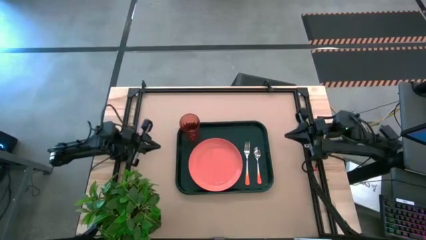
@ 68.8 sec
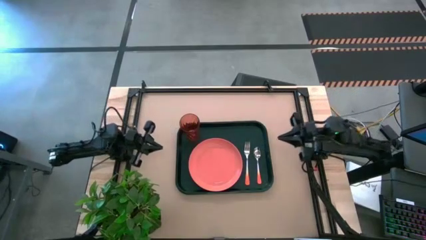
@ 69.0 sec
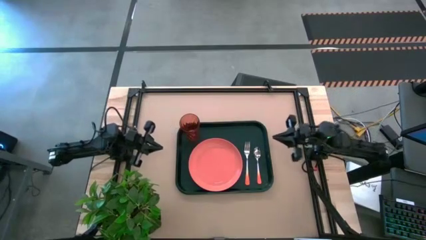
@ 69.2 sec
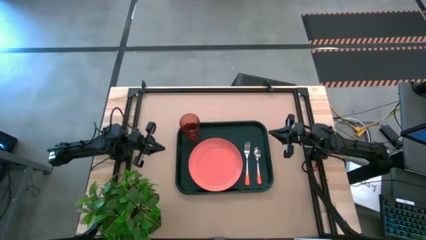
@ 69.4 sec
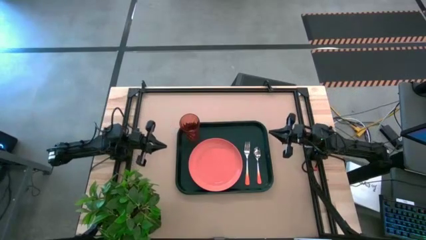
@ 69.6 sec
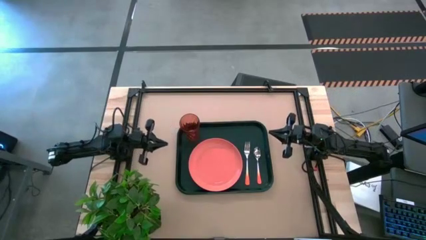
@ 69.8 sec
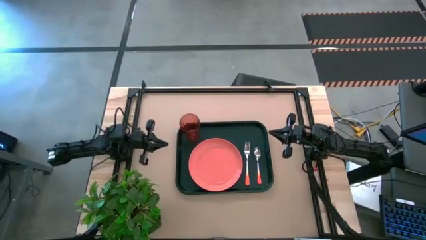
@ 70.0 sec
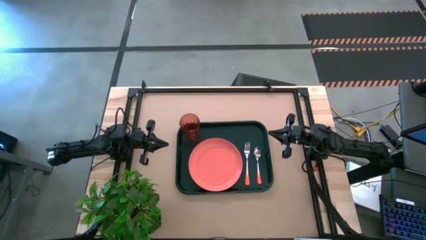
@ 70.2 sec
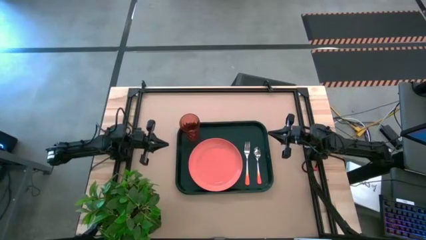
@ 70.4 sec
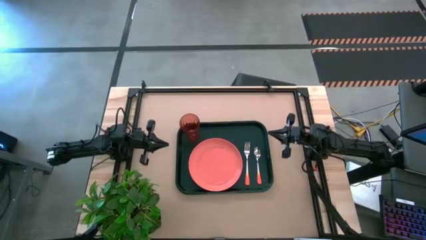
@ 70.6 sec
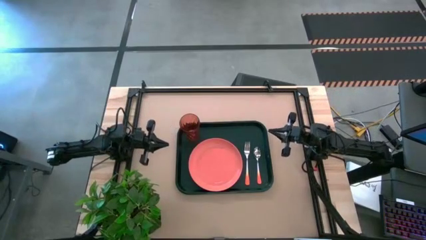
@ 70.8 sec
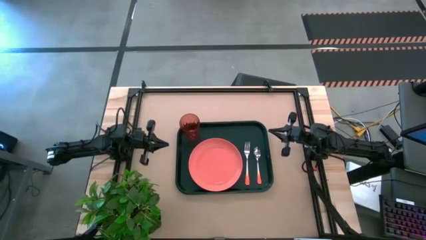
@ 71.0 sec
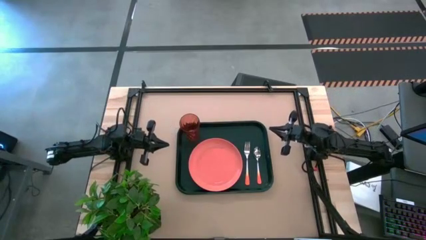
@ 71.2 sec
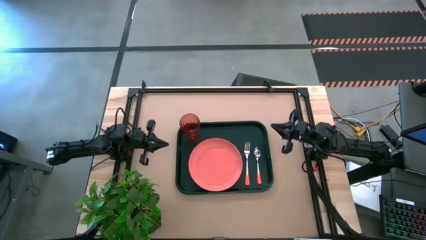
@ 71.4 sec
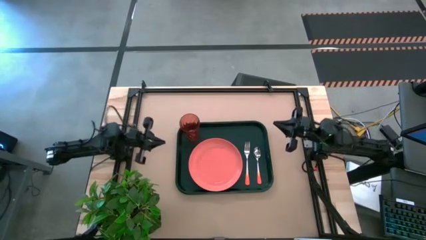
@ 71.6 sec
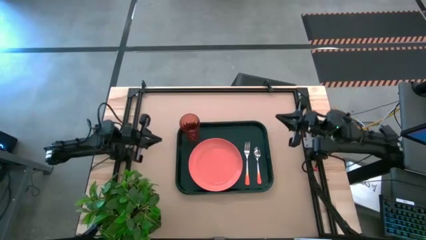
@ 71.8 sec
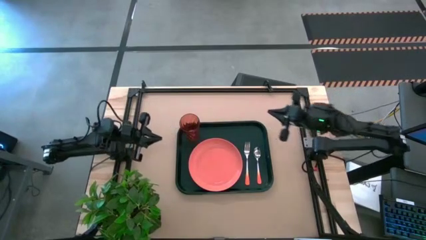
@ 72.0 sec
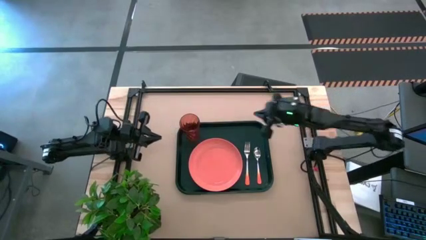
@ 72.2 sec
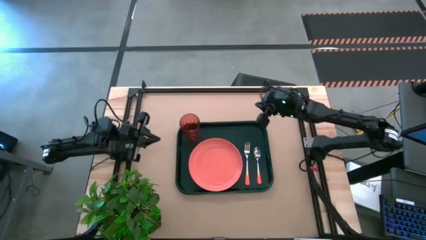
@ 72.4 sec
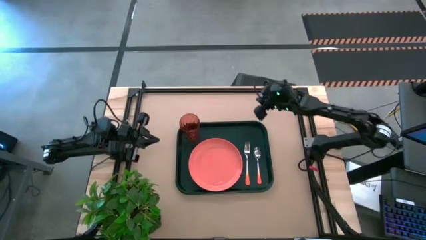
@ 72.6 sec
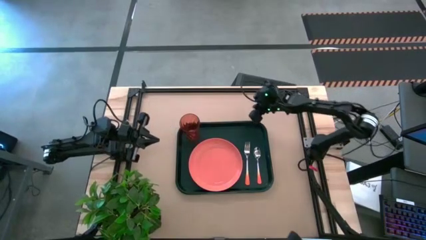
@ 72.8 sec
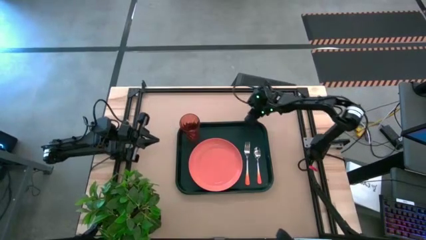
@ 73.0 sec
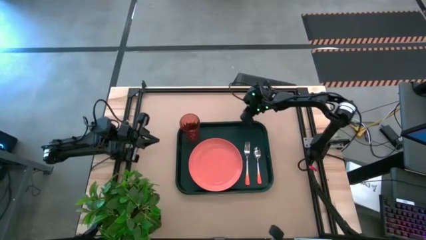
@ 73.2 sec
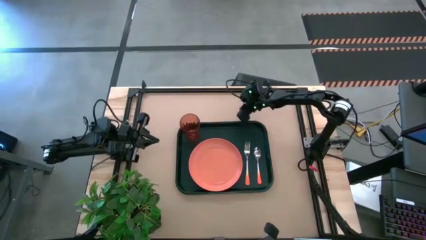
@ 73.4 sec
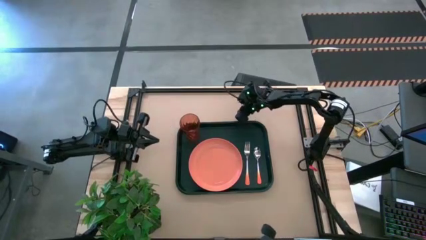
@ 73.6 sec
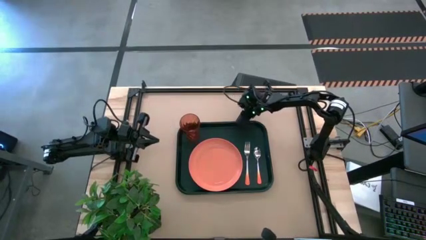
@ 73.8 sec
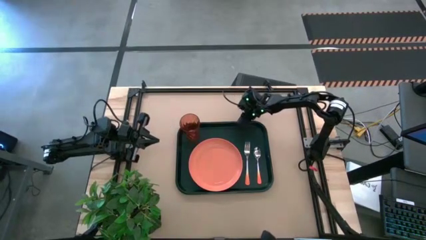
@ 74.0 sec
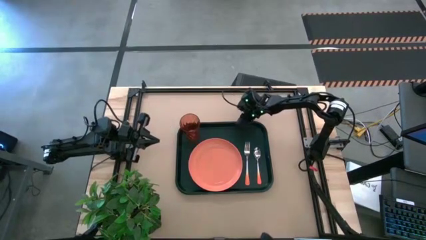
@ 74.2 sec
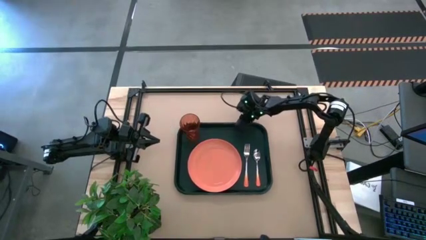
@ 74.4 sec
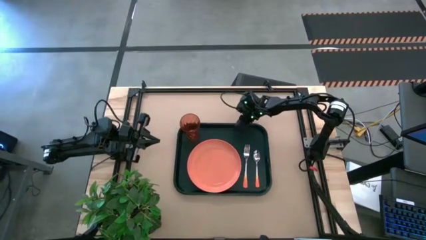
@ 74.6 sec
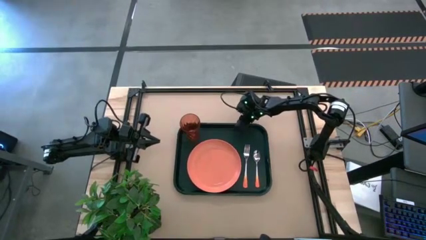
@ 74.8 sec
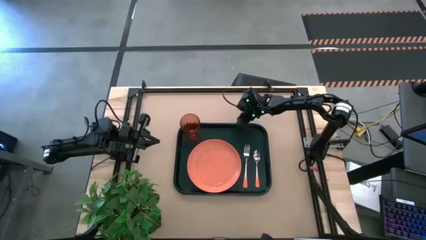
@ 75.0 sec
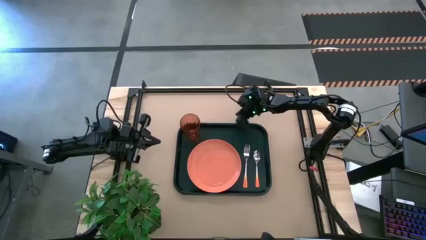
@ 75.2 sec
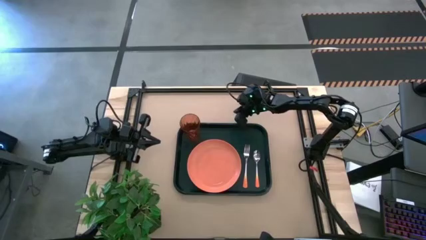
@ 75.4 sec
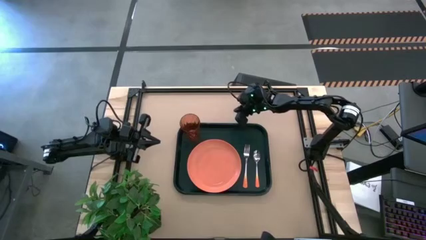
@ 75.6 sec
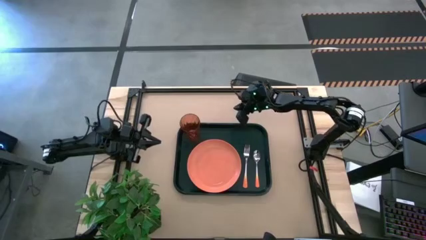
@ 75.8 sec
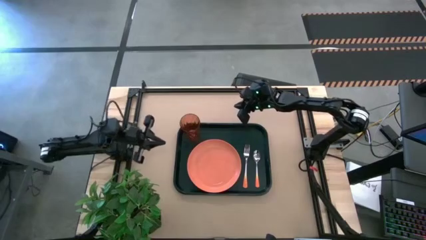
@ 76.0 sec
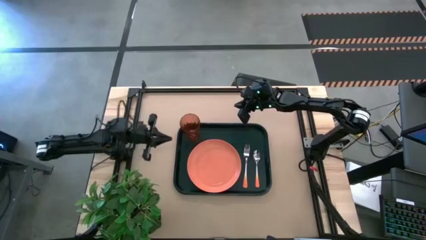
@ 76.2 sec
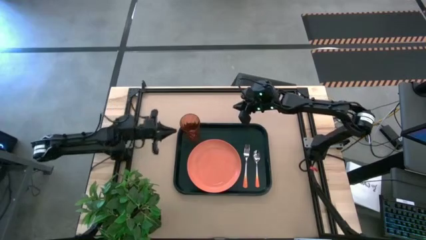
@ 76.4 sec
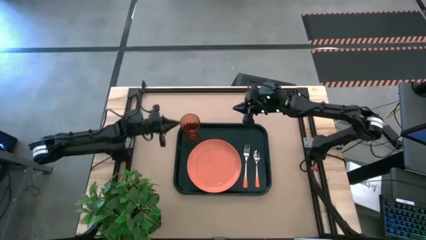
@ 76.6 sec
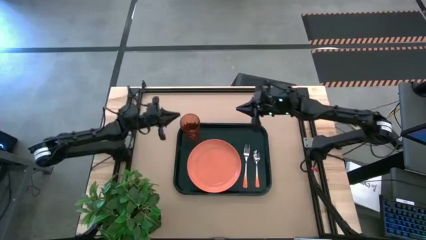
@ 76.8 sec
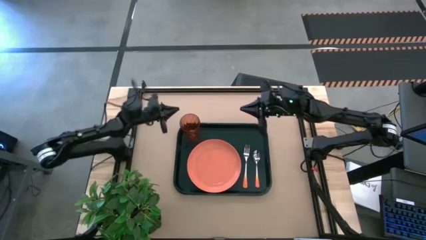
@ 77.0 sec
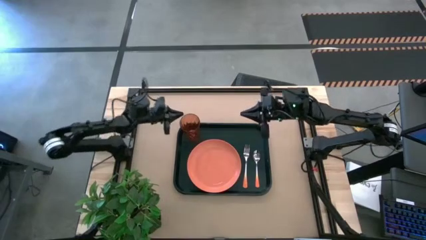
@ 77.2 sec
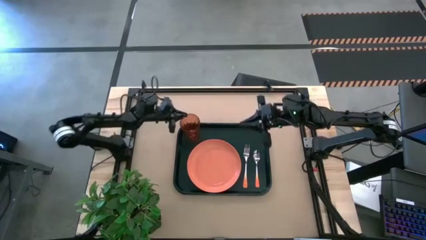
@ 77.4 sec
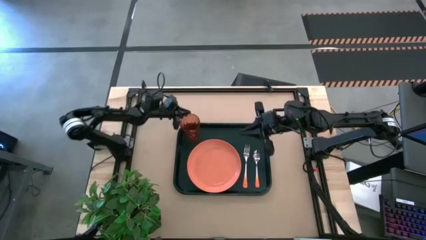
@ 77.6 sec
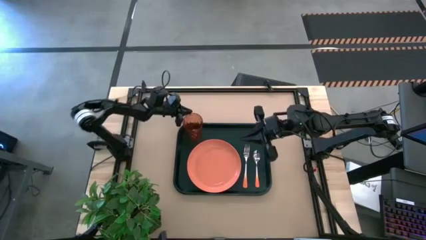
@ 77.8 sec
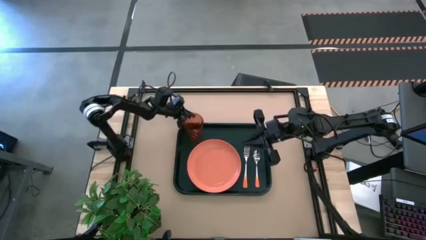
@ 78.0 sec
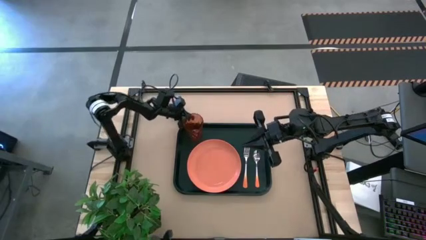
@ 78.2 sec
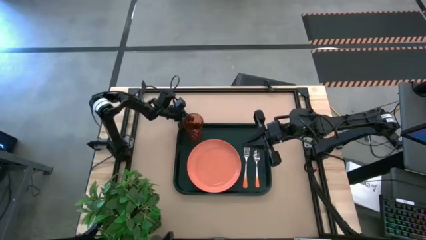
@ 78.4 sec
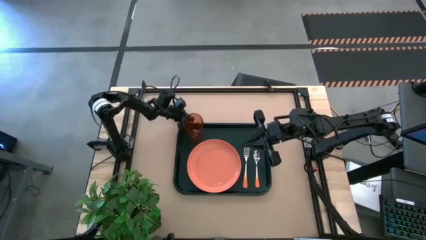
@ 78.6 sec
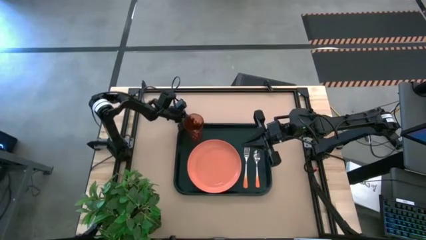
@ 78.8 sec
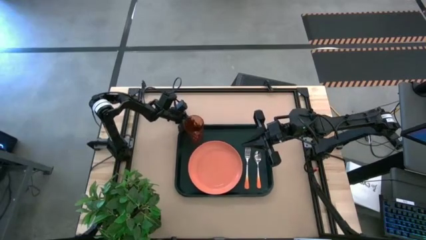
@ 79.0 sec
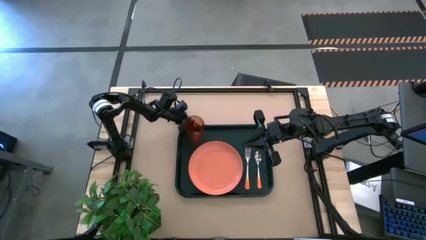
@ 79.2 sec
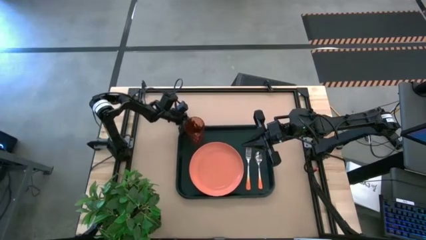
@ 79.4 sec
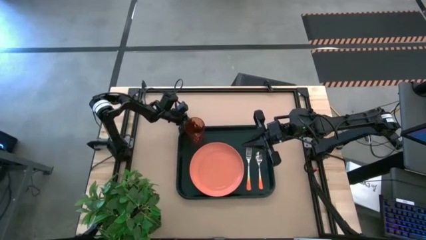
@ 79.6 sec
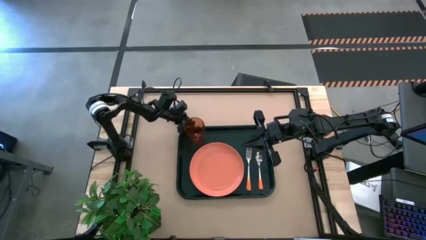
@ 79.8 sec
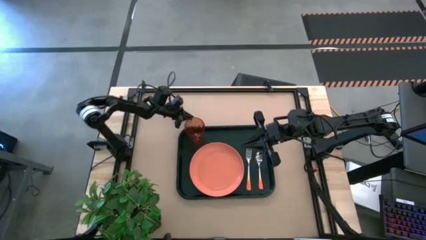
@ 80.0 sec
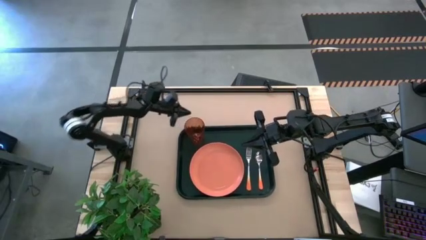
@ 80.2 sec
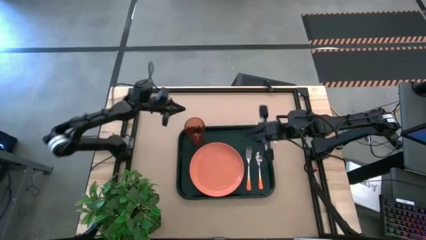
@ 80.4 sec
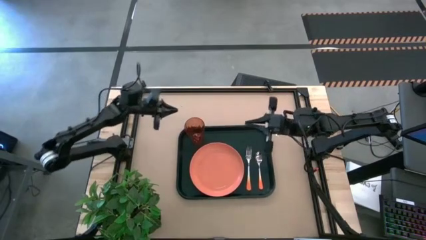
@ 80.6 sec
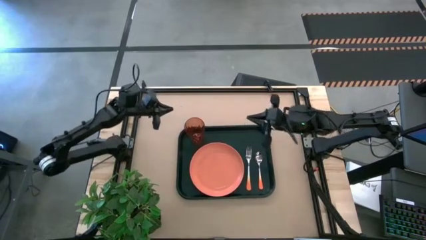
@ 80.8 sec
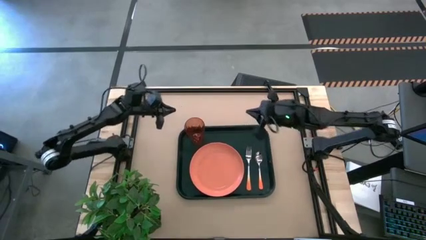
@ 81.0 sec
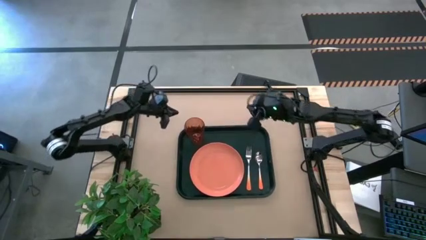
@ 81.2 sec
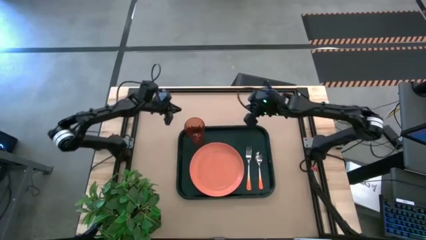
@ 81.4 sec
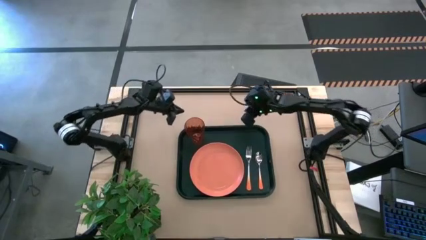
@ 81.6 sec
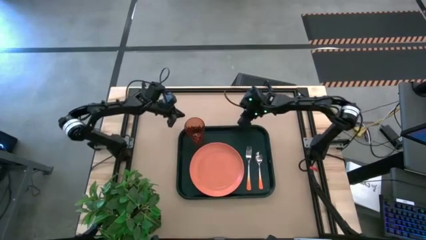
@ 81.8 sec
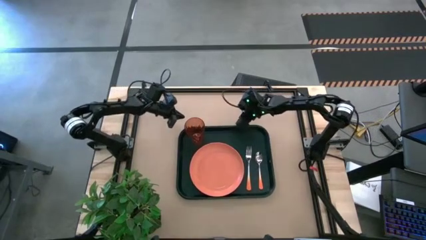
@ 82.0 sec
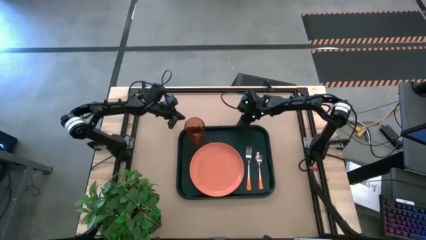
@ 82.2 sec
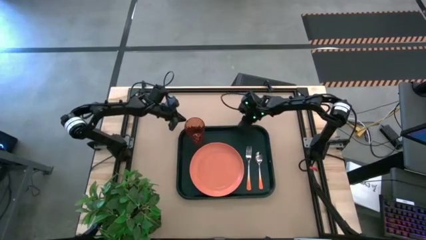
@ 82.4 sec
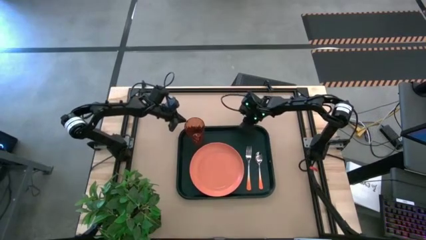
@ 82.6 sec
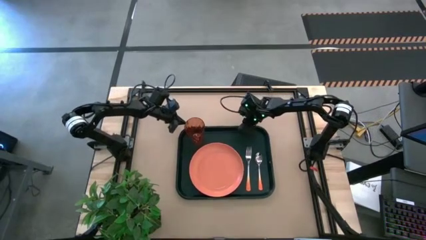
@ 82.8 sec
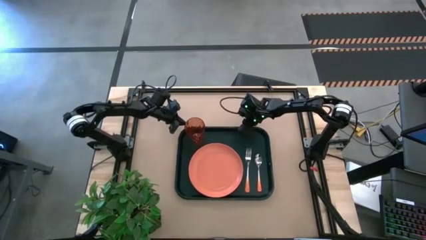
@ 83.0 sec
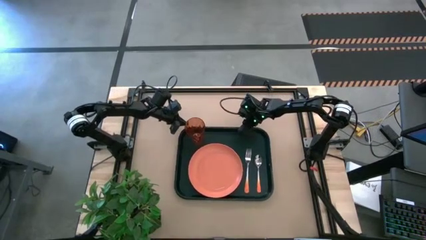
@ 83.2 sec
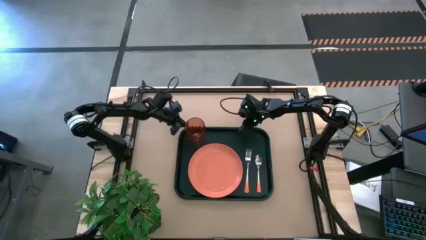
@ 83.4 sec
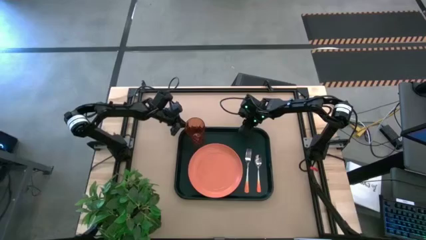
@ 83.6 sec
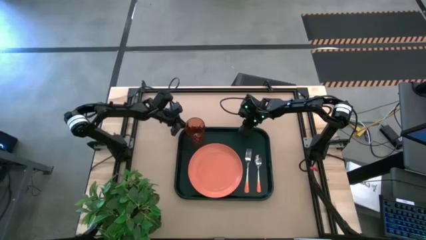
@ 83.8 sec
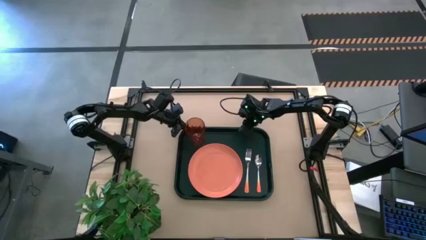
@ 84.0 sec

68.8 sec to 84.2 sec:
Task: Pick and place plate/cup/fork/spoon on tray
Adjust the black table tray
